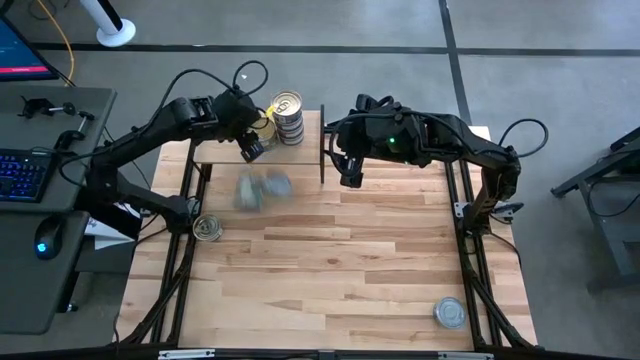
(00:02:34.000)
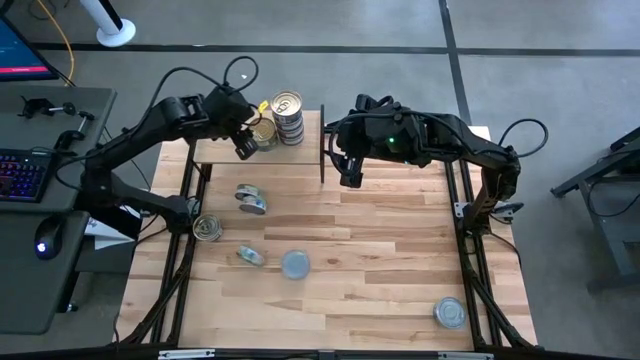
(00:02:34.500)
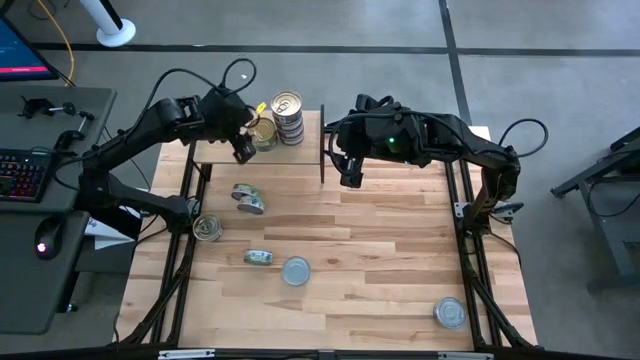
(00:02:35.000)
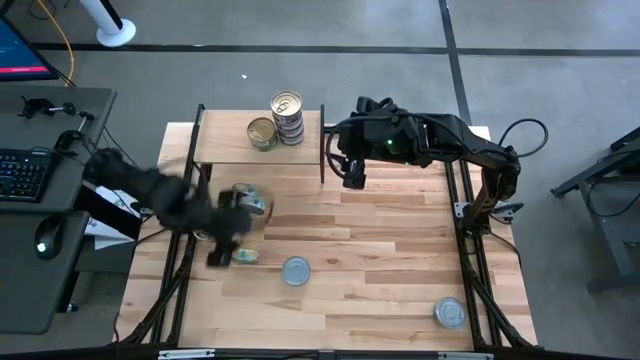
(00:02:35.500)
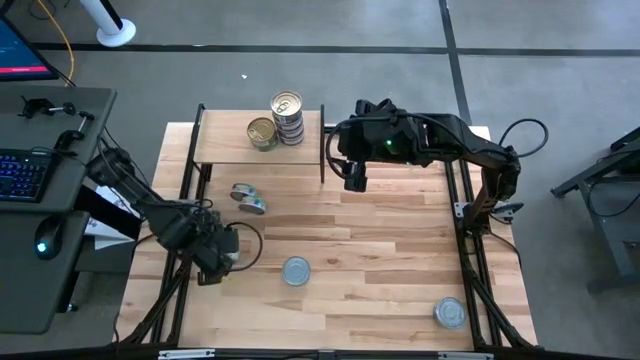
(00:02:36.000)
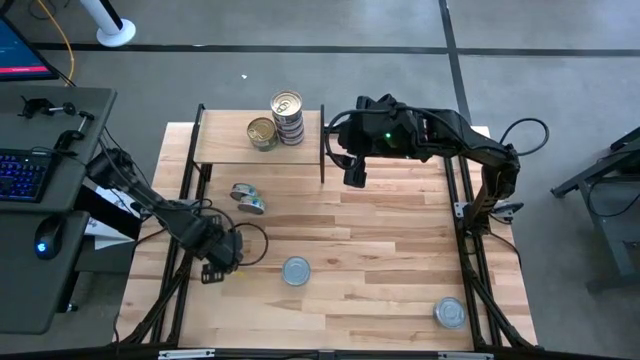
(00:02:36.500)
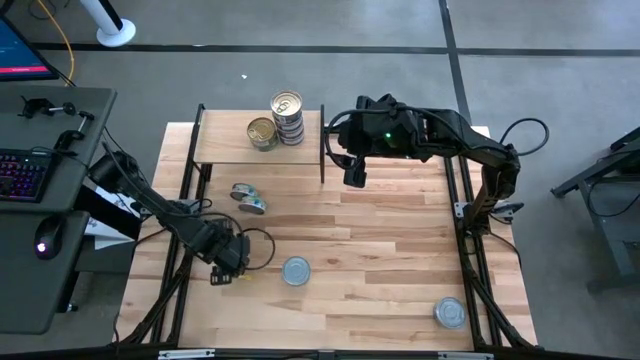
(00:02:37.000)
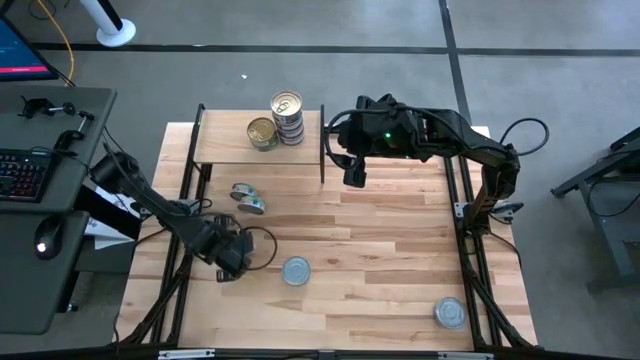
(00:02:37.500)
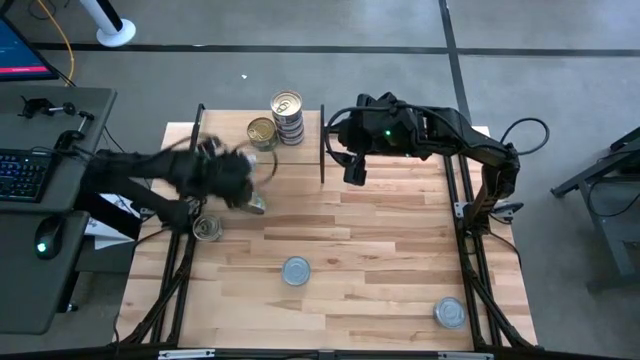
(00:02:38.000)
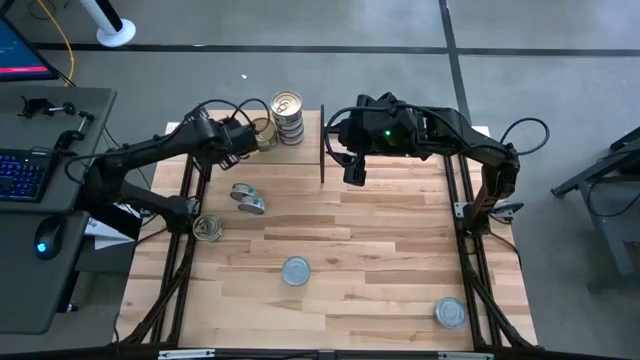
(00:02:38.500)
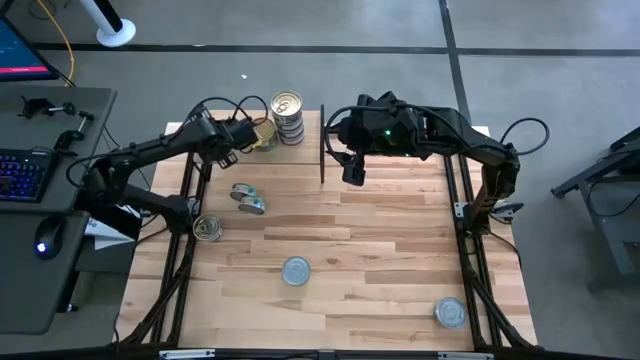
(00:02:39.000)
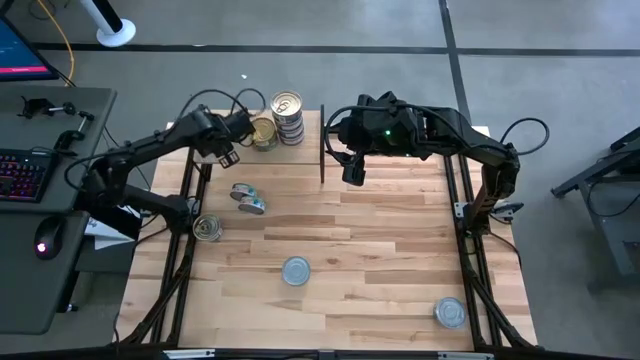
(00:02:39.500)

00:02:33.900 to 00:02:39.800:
Task: Stack canned seafood by type on shelf
Put the green-white tuna can on the shelf

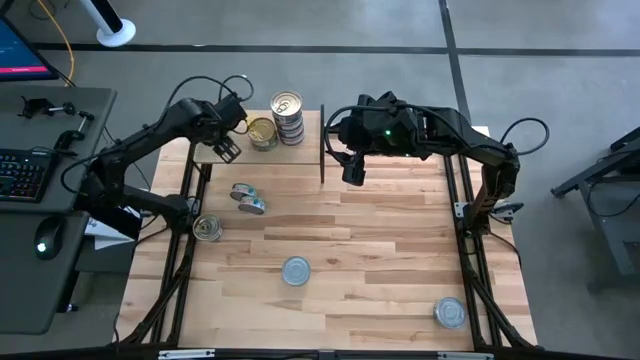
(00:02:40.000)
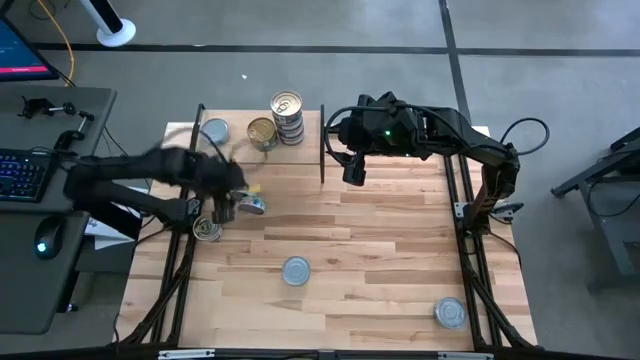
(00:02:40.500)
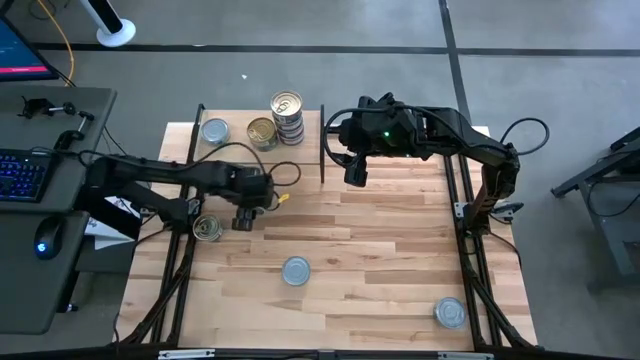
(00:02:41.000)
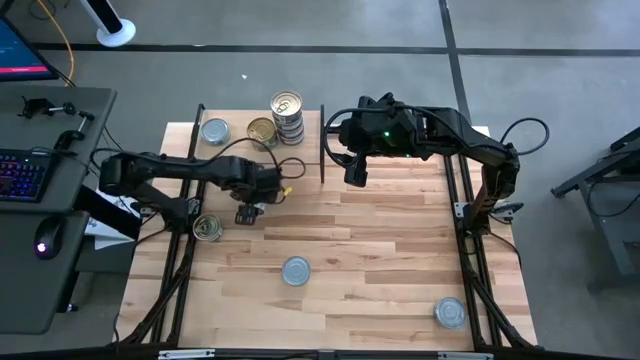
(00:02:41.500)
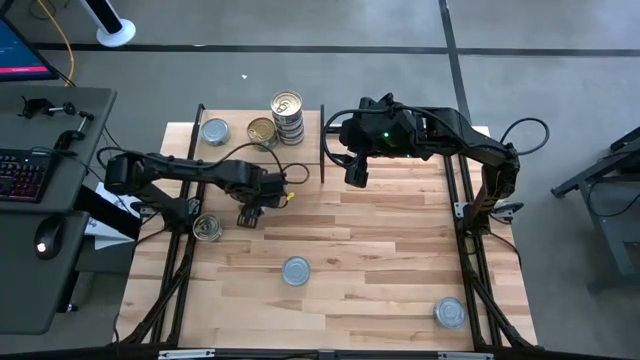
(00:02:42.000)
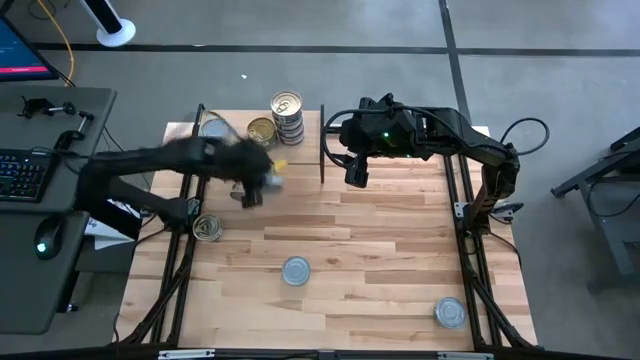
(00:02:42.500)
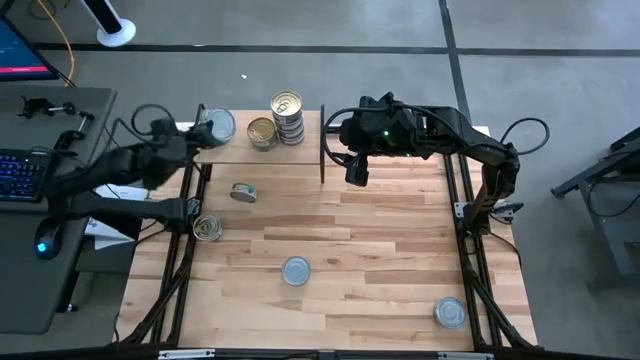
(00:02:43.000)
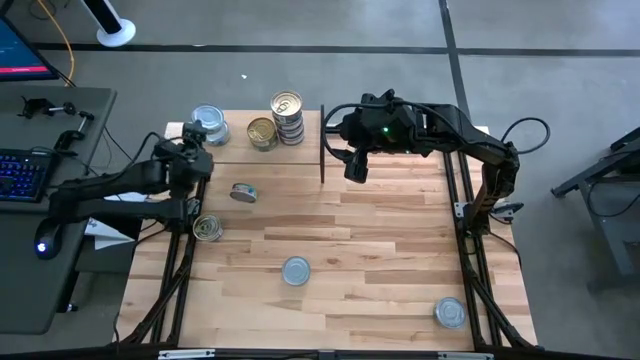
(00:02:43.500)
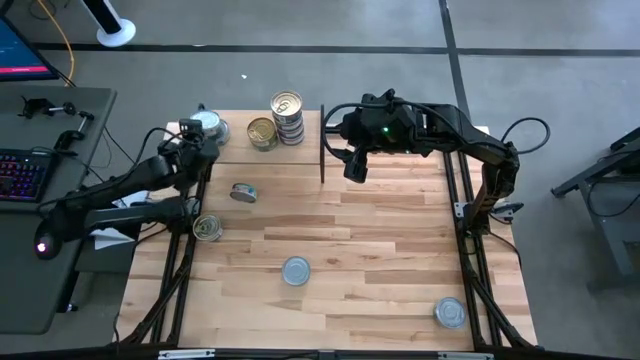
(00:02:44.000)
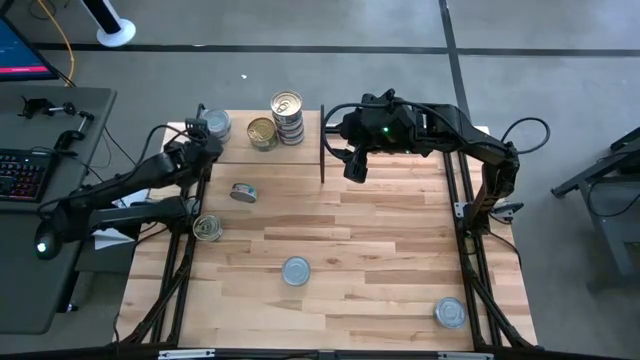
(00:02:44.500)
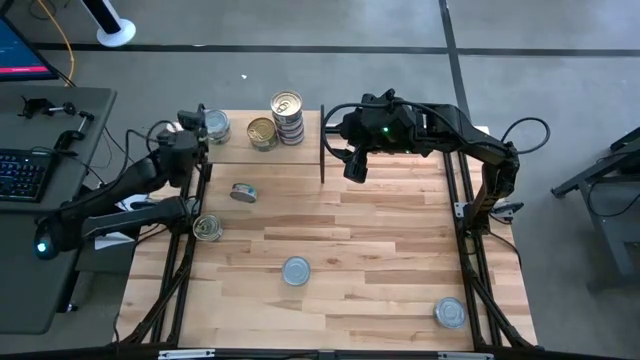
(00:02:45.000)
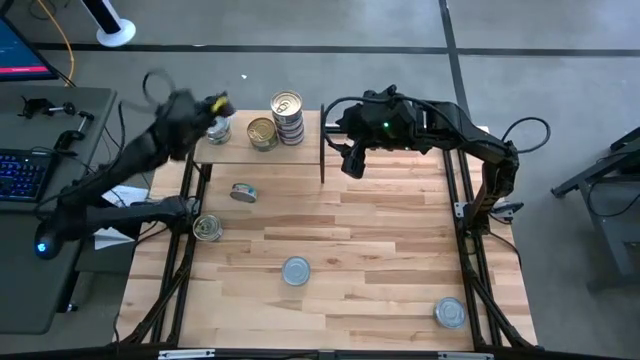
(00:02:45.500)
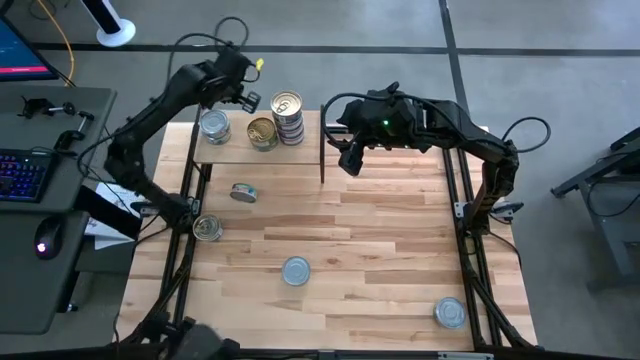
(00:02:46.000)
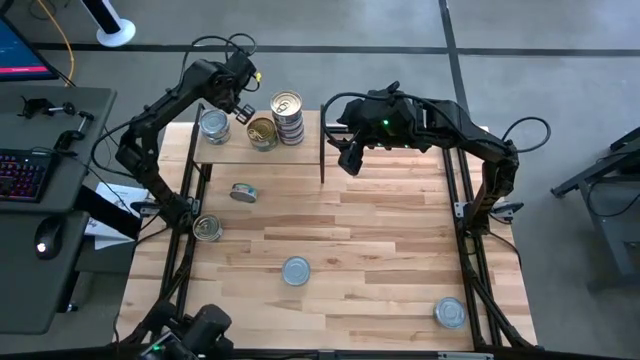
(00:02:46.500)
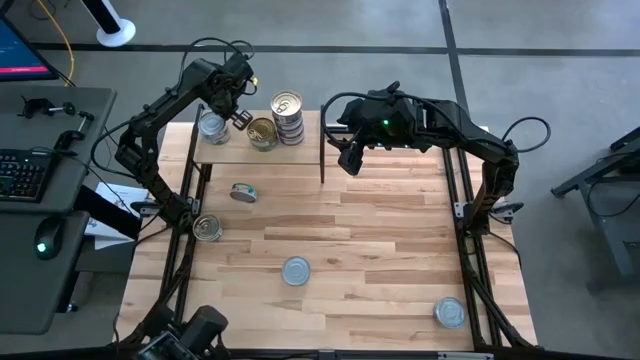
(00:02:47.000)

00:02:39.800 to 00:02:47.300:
Stack the green-white tuna can on top of the green-white tuna can on the shelf

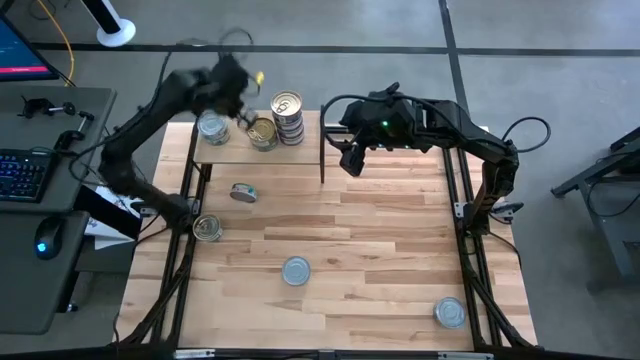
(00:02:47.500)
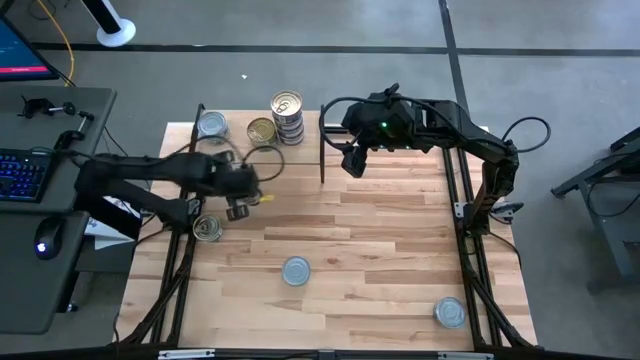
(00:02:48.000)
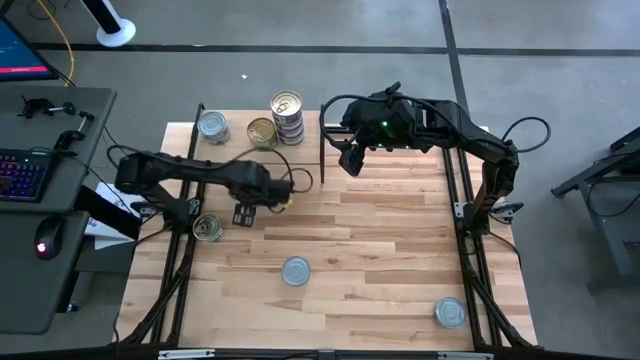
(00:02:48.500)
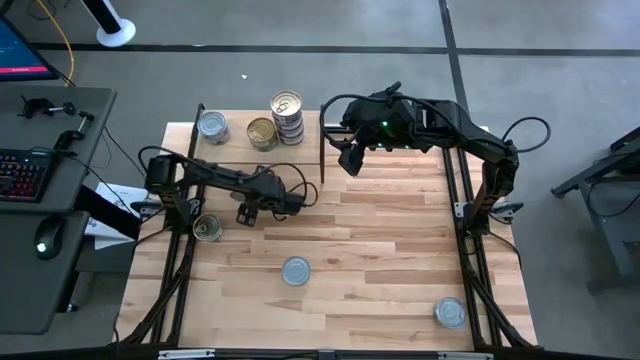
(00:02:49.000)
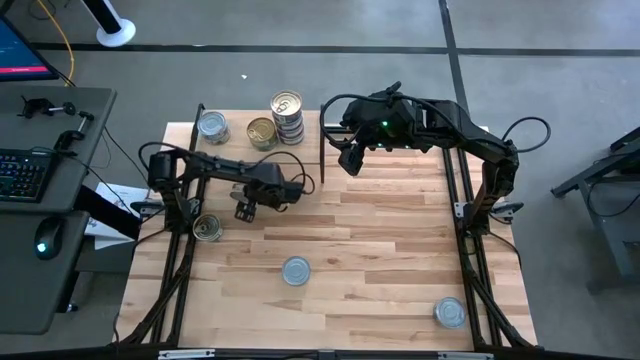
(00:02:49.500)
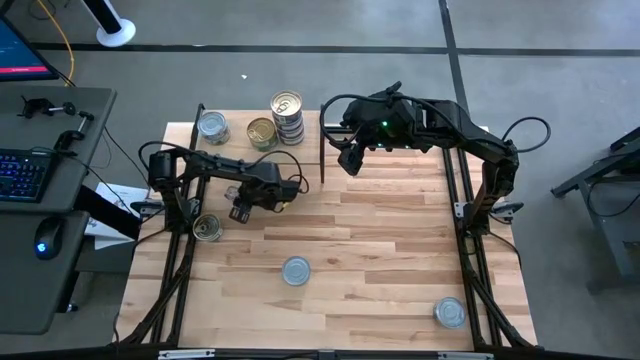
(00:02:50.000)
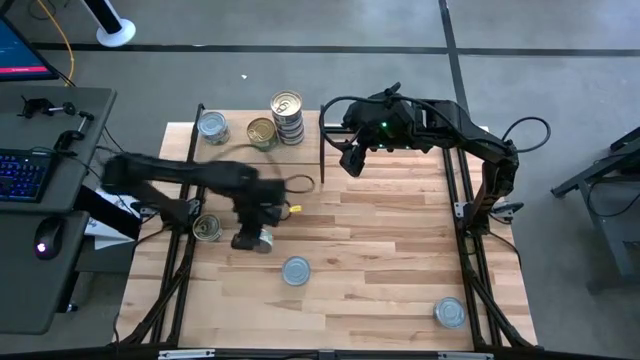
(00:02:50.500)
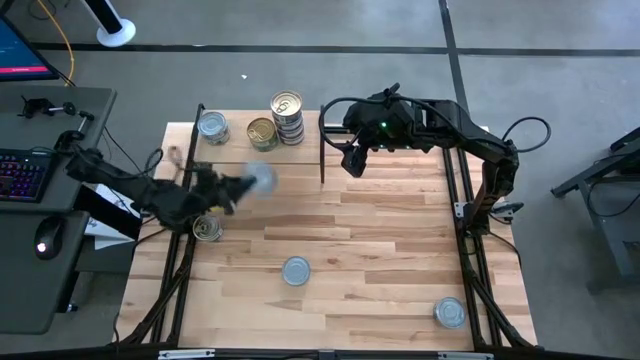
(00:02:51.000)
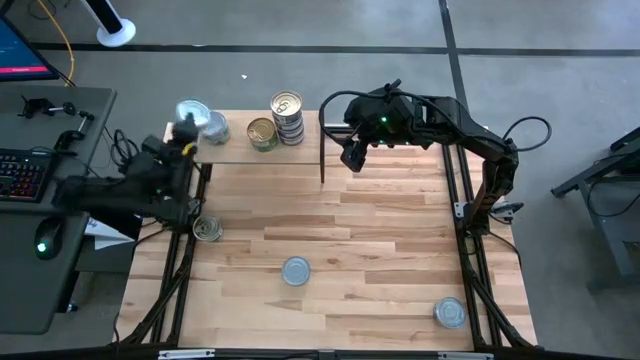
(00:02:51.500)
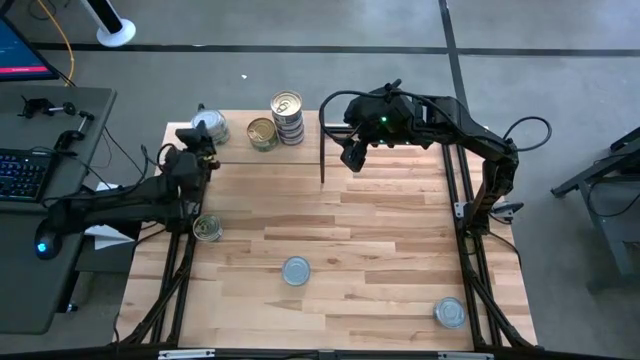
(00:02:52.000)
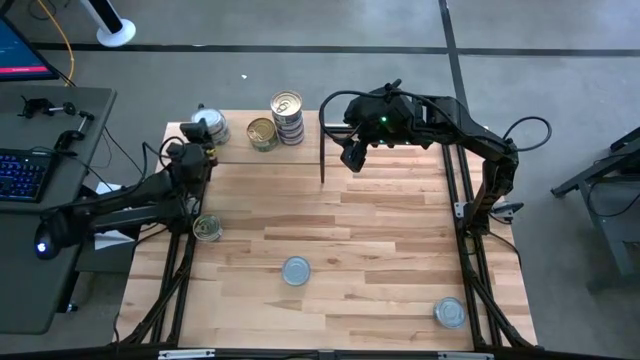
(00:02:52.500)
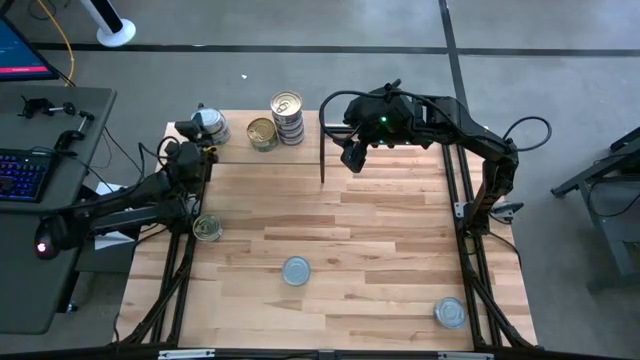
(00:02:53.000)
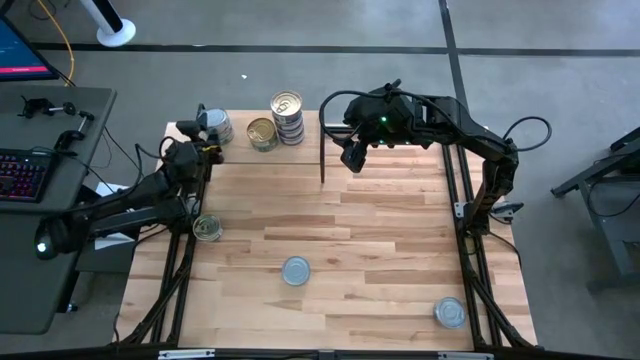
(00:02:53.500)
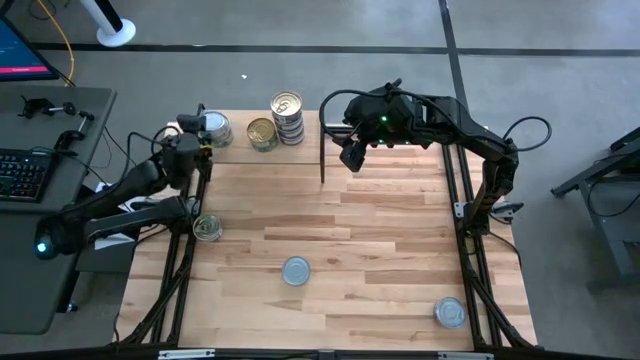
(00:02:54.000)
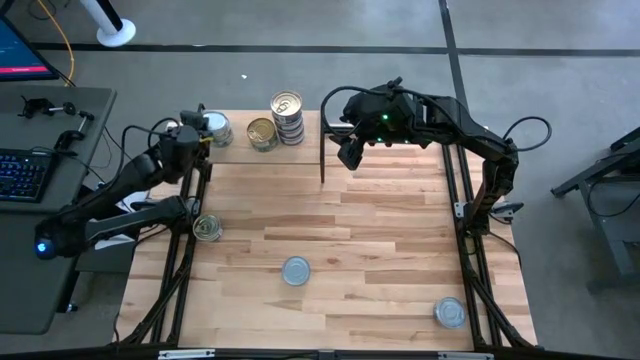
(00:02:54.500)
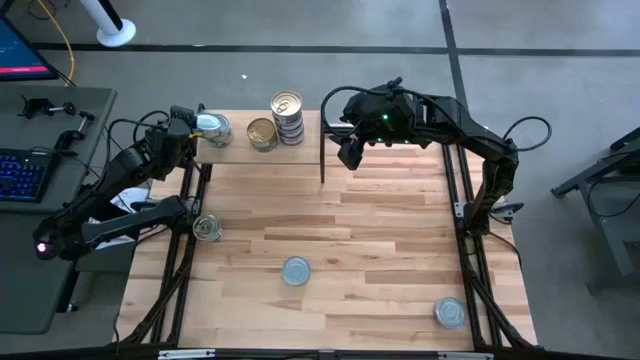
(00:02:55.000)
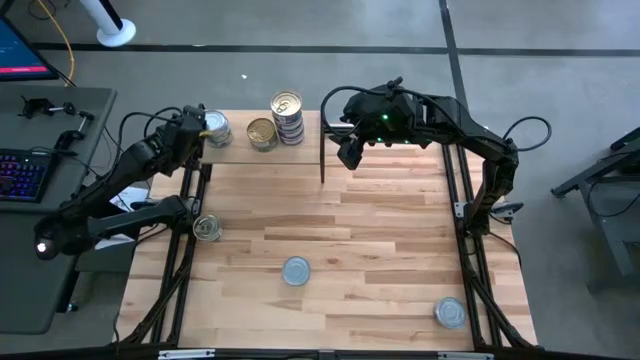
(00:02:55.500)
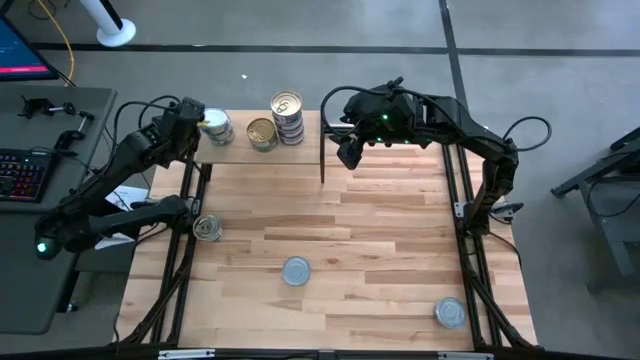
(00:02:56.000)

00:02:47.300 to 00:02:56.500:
Stack the green-white tuna can on top of the green-white tuna cans on the shelf
